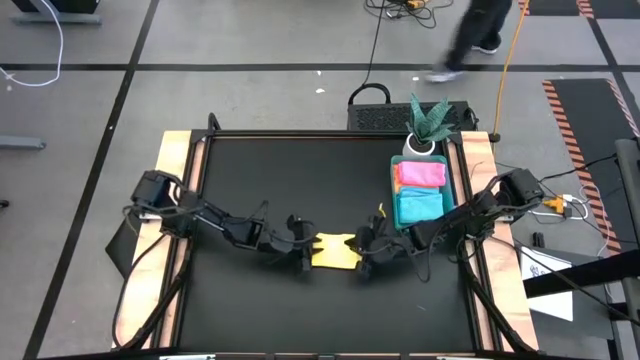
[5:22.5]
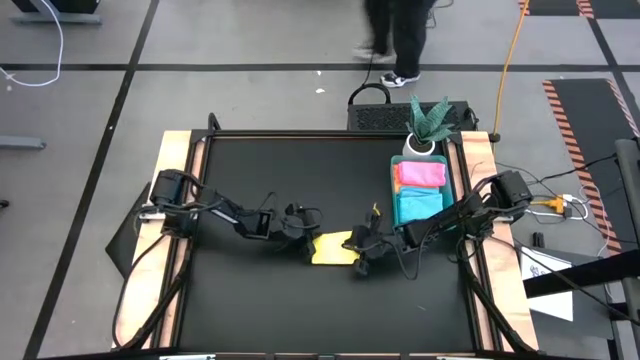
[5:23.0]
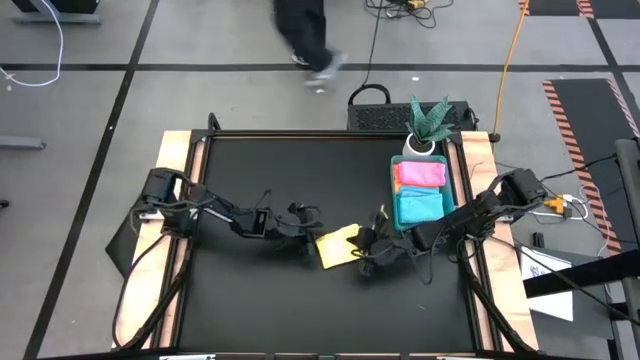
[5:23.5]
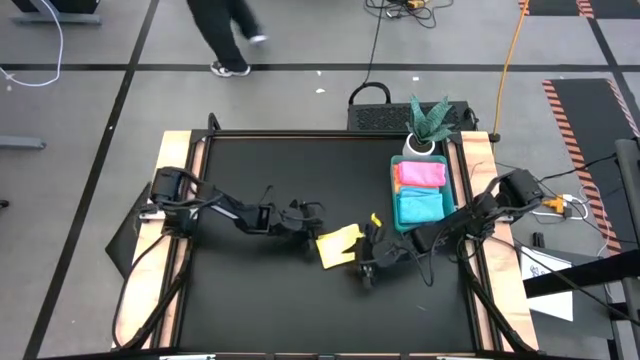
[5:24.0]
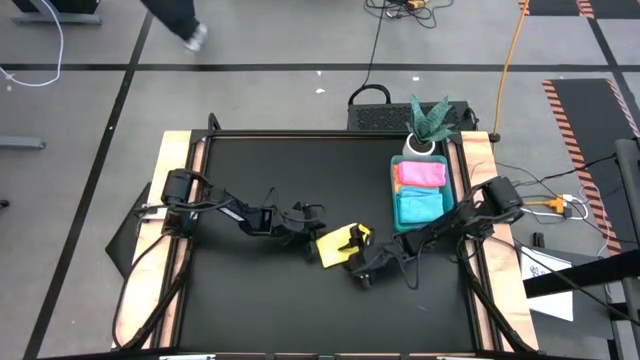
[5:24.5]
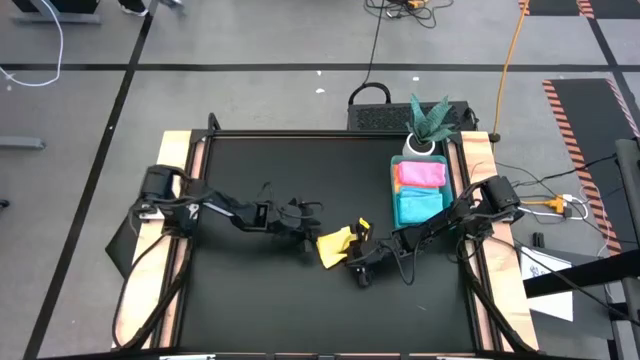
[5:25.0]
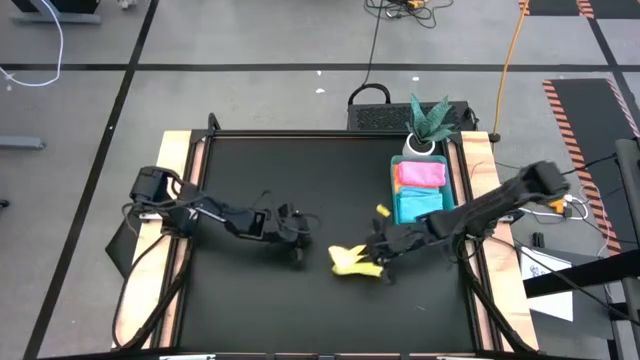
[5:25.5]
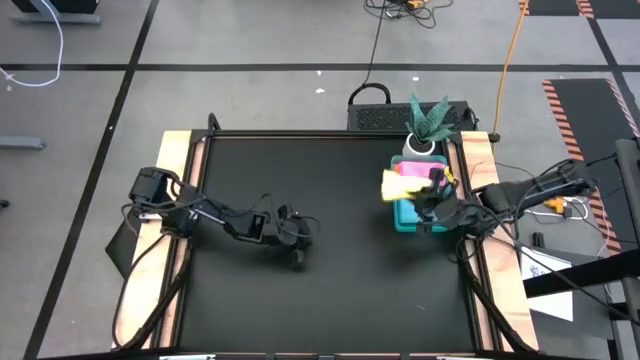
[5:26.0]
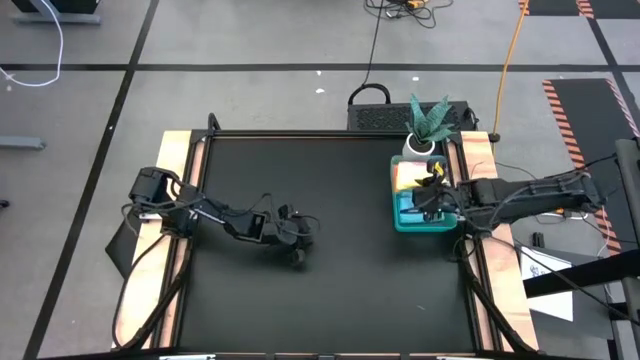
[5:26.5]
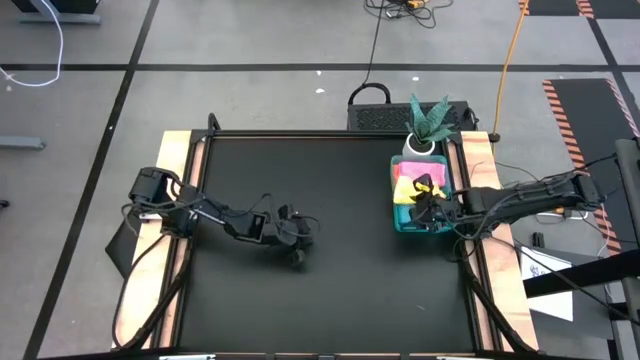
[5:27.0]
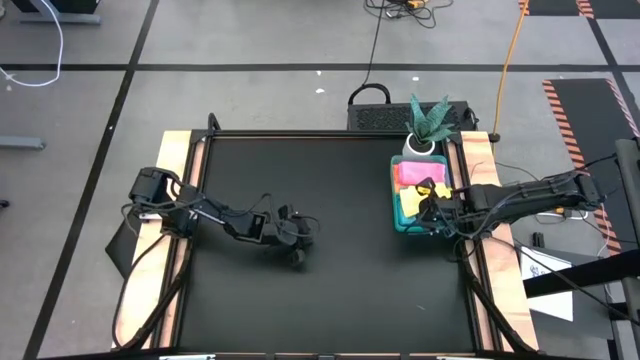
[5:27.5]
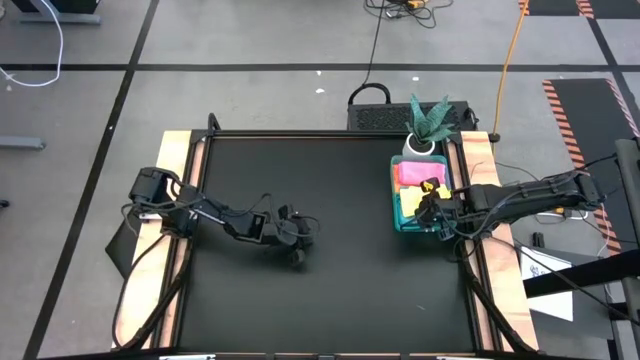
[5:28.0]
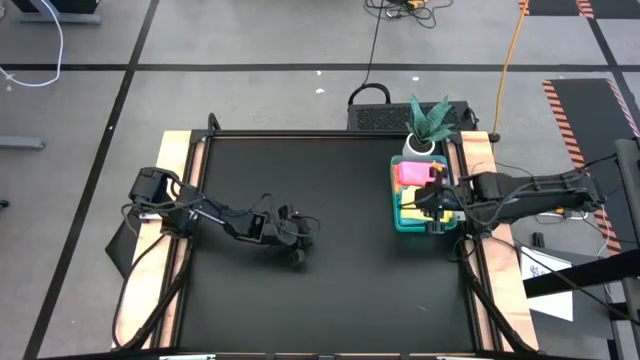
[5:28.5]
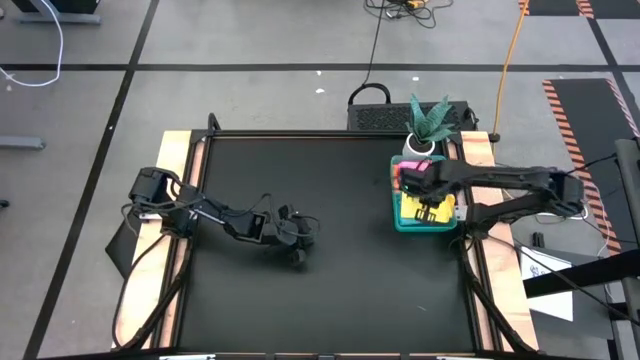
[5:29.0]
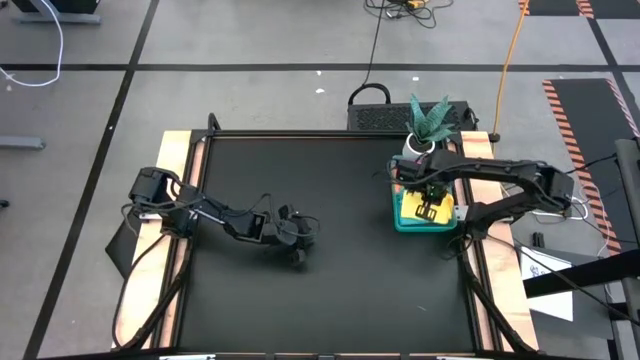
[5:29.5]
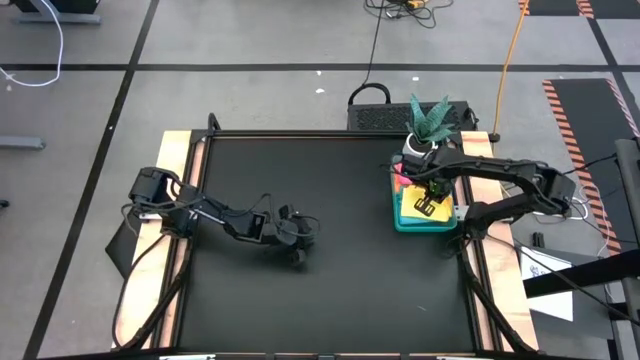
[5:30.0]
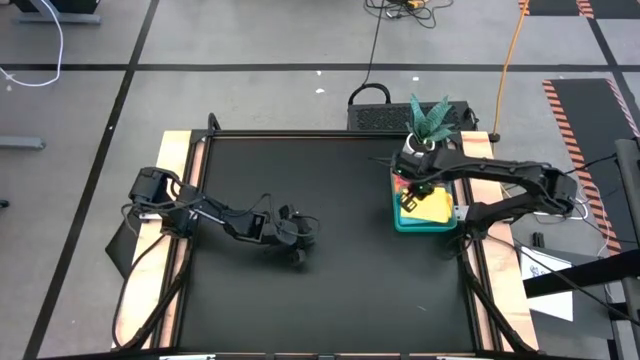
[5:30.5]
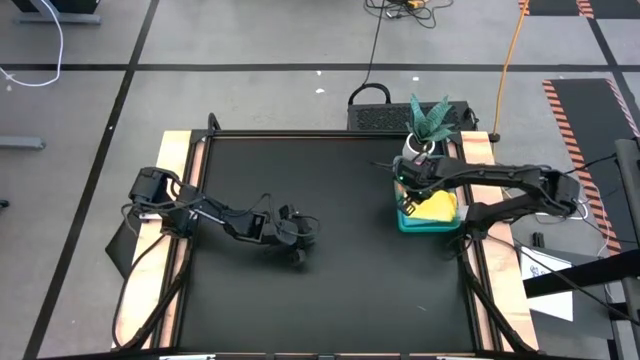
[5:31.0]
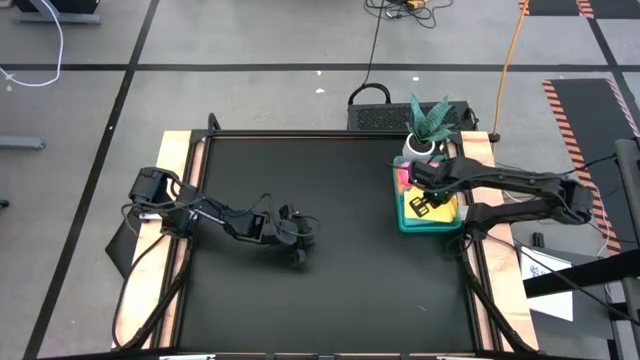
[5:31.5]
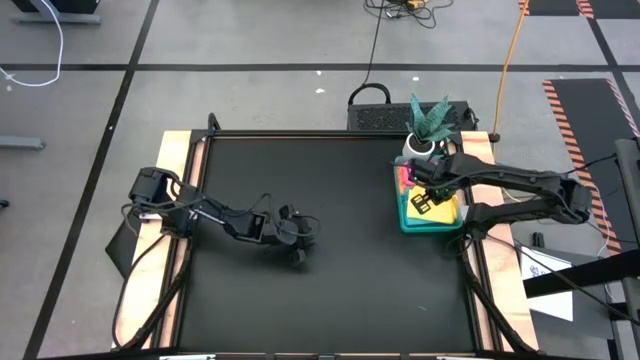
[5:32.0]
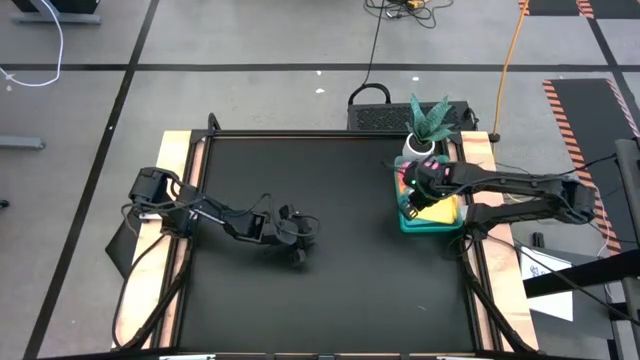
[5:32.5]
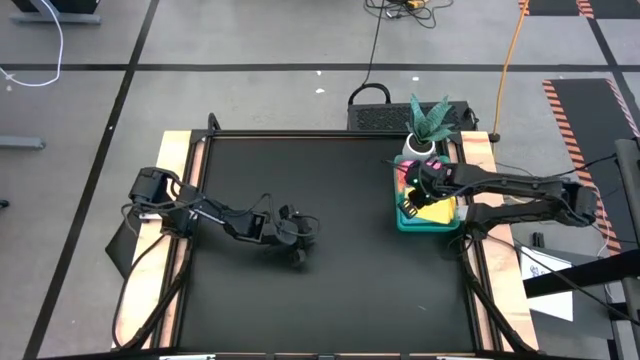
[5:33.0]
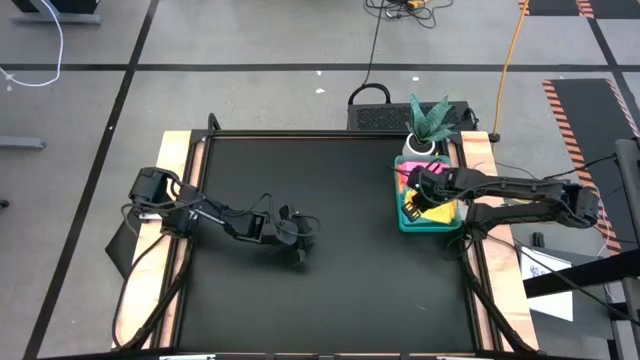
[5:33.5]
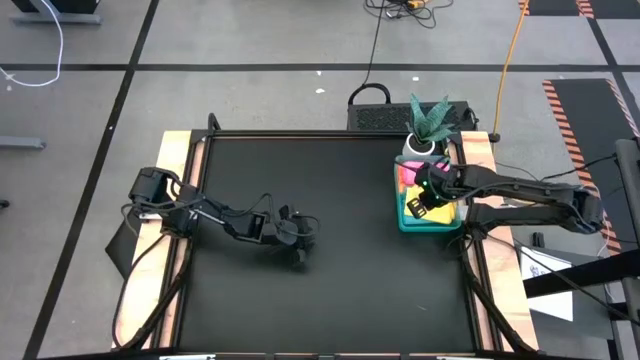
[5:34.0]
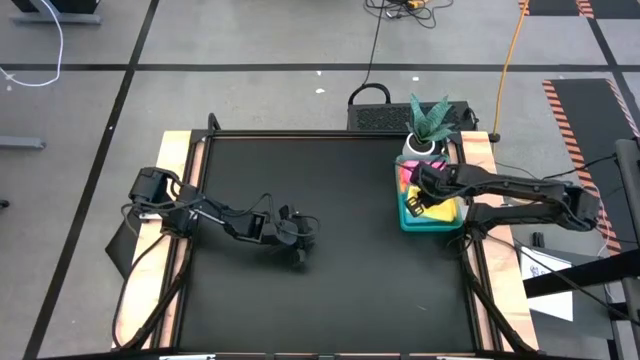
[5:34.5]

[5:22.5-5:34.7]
Task: Fold microfiber towels
Put the yellow microfiber cloth into the green bin

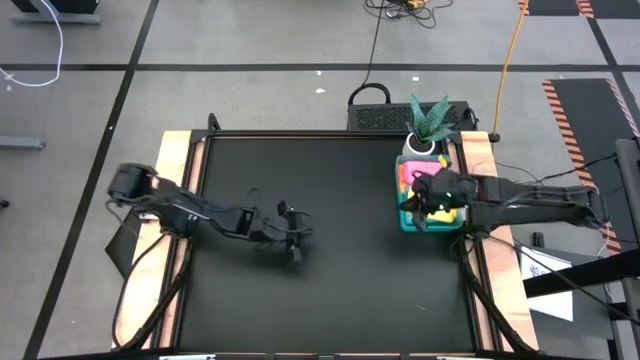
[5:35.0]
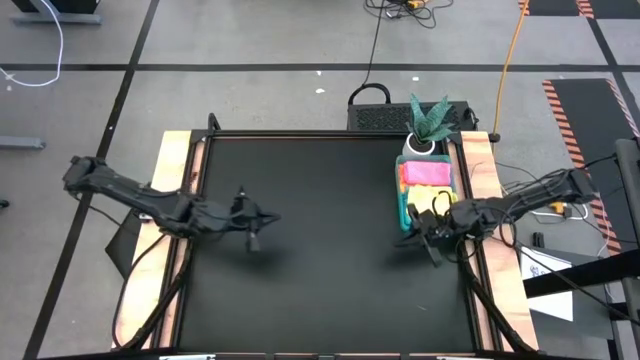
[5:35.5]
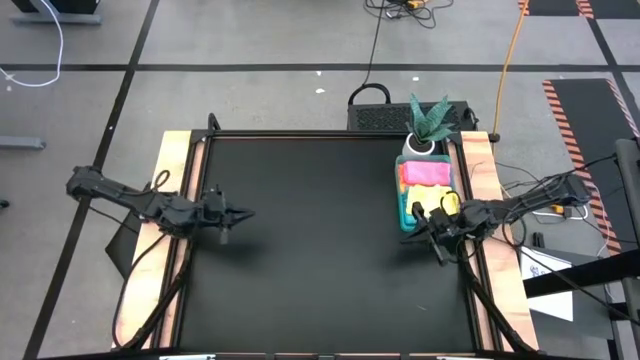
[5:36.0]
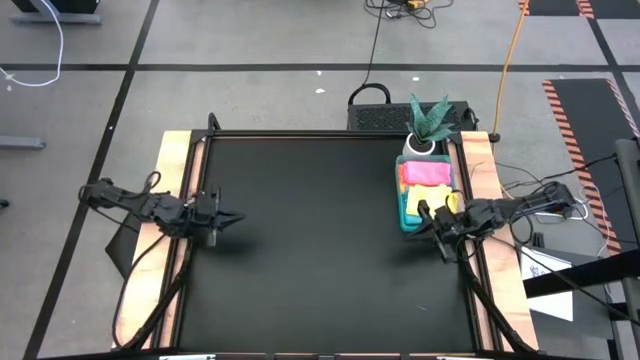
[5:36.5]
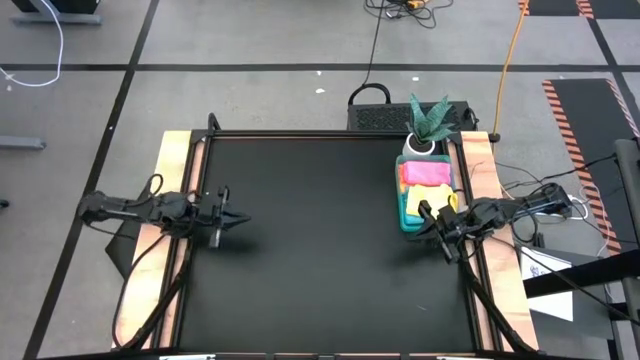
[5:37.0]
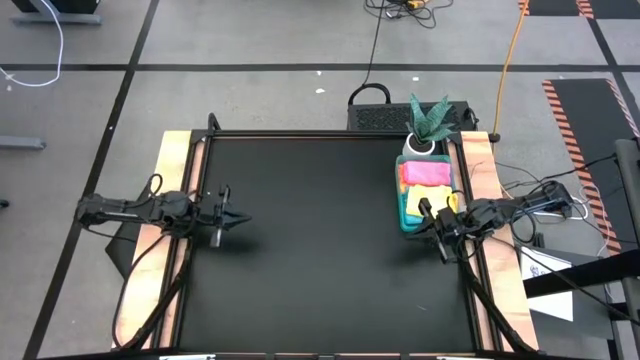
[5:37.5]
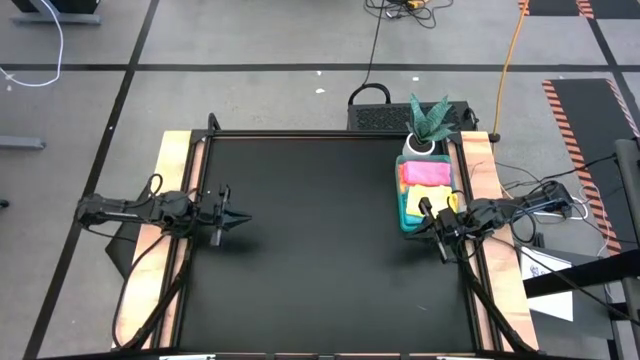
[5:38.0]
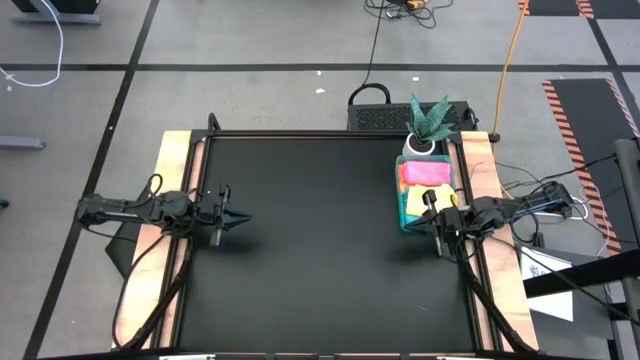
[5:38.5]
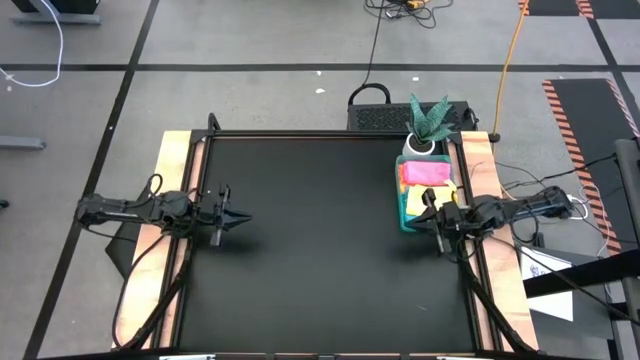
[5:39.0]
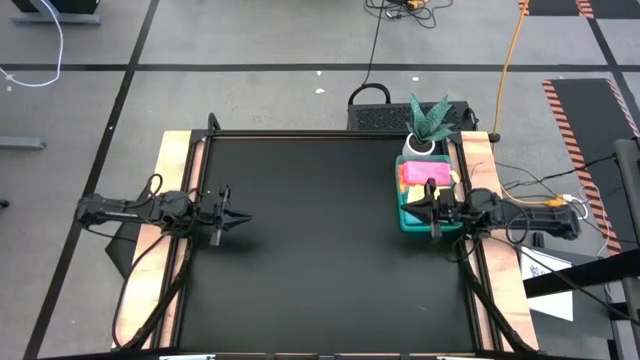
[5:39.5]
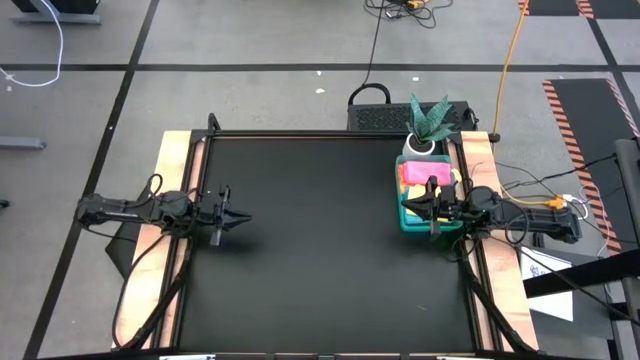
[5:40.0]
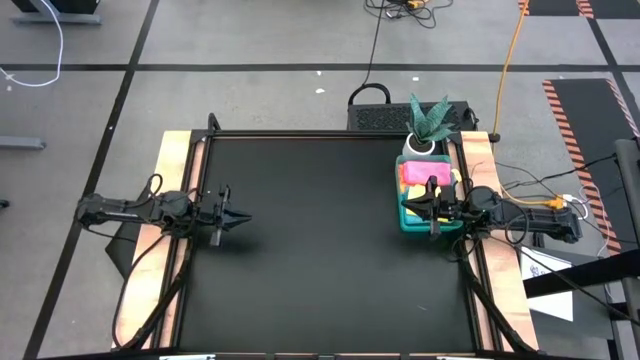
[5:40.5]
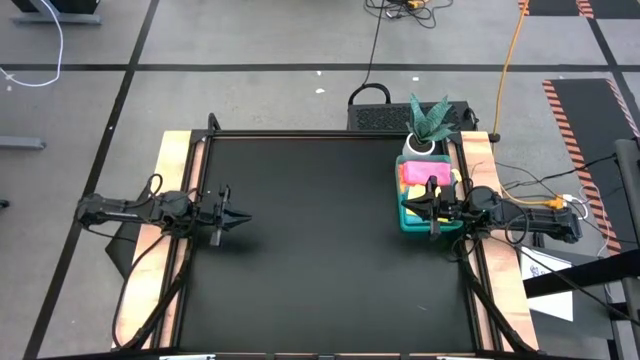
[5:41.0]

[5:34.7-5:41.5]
Return to Home Position

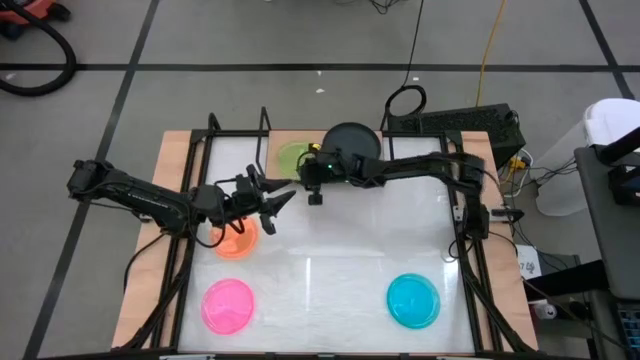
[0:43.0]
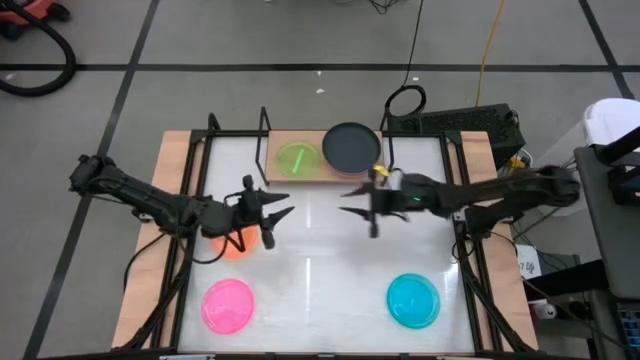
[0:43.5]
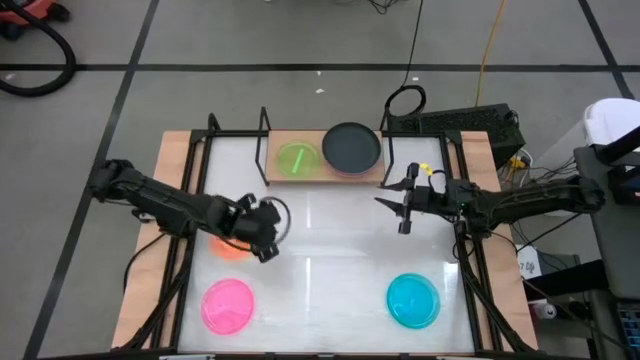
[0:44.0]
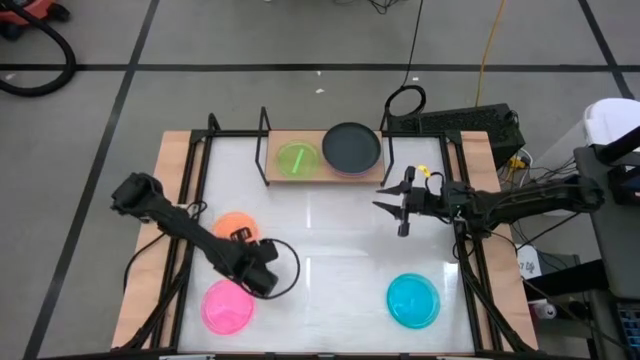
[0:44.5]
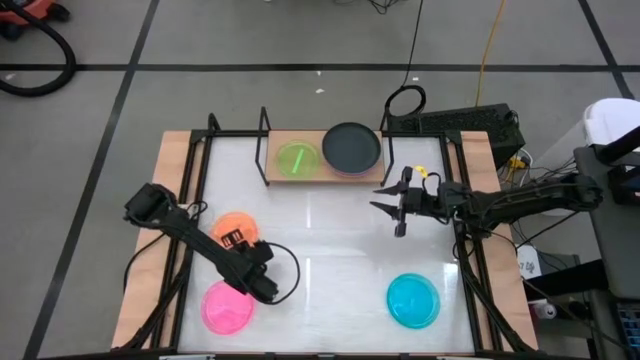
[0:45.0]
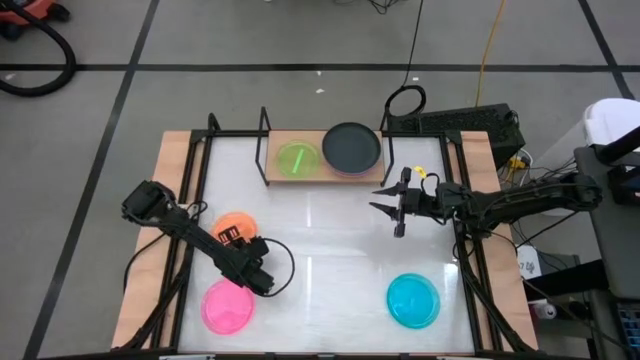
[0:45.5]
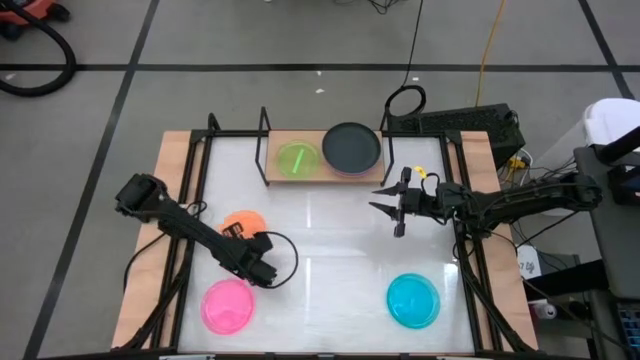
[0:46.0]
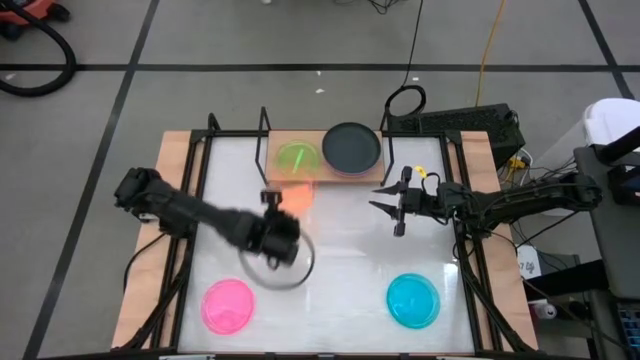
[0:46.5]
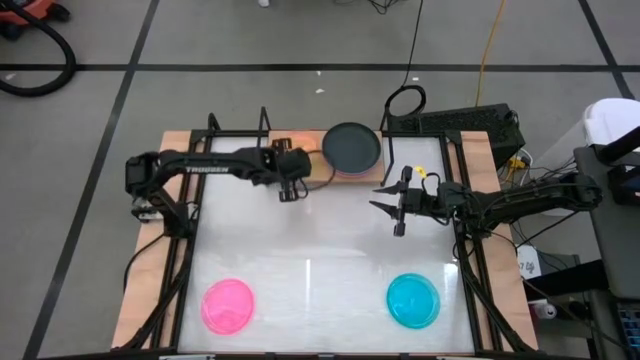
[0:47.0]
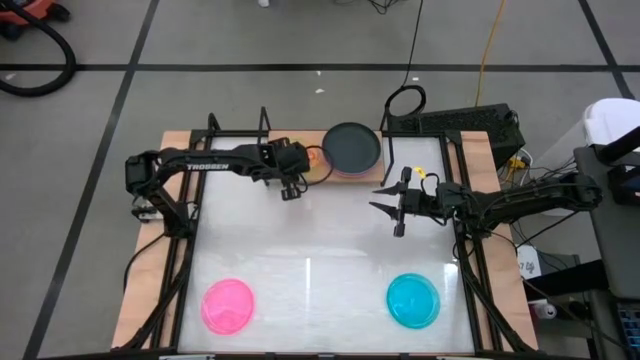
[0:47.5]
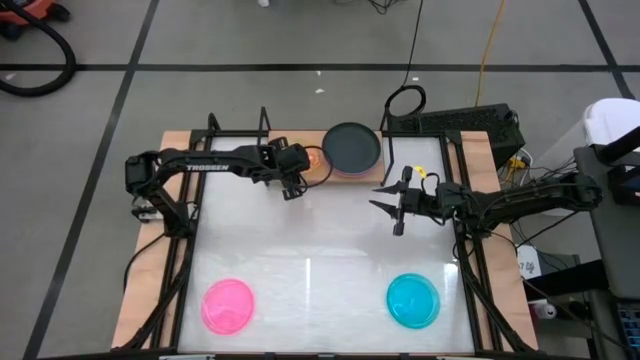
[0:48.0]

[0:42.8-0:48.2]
Task: Place and stack plates onto a shelf
Stack the light orange plate on top of the light green plate on the shelf
